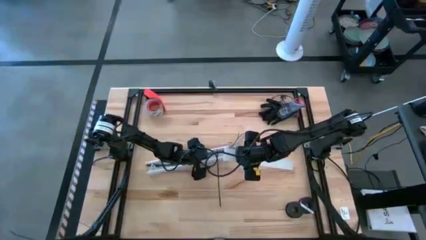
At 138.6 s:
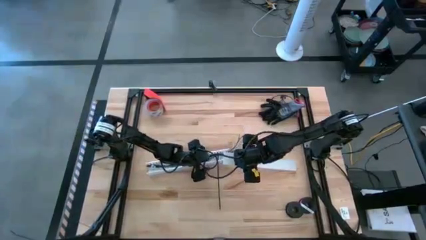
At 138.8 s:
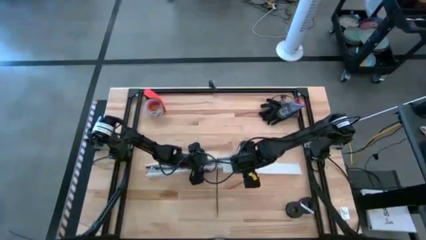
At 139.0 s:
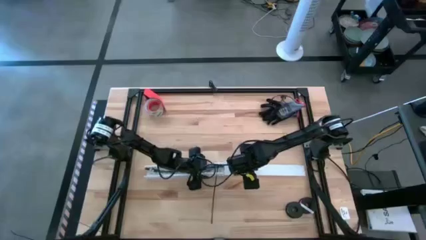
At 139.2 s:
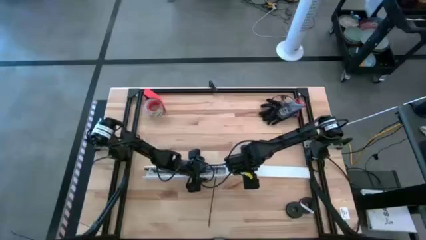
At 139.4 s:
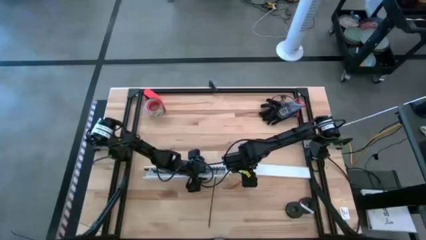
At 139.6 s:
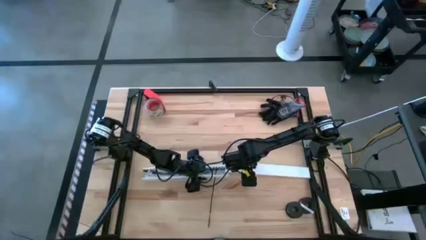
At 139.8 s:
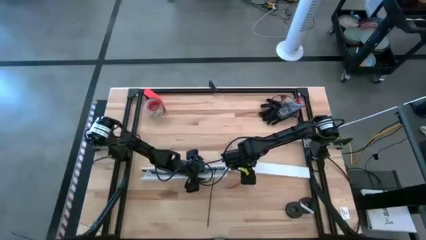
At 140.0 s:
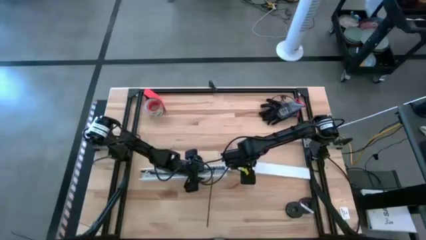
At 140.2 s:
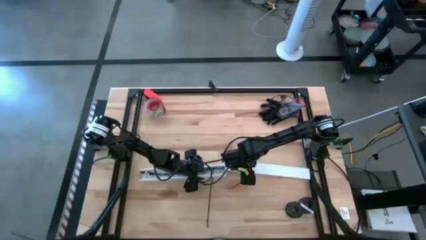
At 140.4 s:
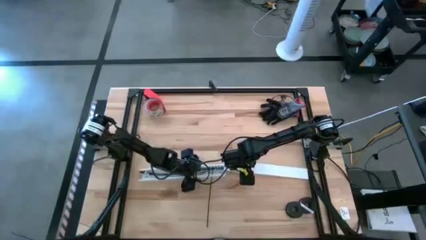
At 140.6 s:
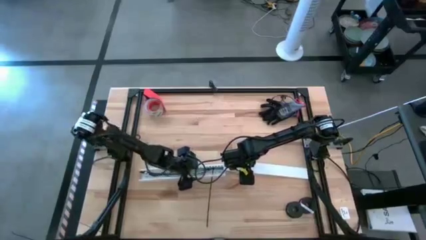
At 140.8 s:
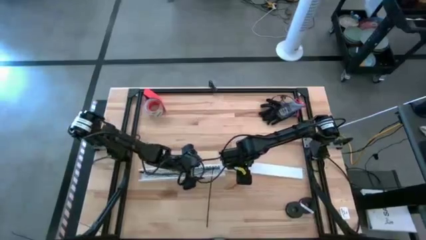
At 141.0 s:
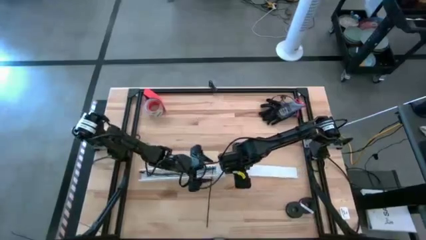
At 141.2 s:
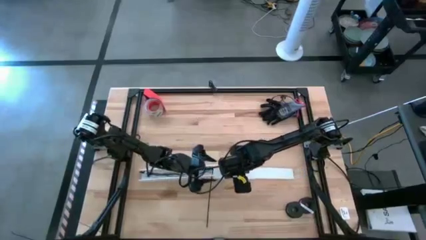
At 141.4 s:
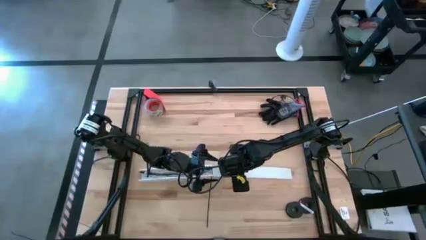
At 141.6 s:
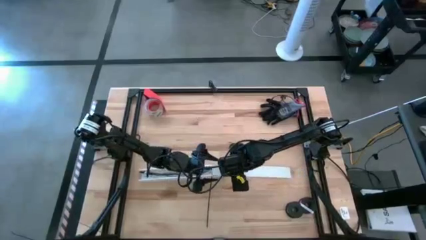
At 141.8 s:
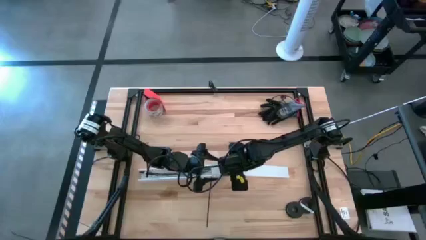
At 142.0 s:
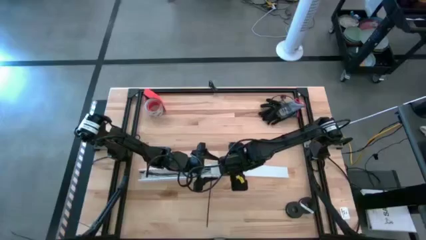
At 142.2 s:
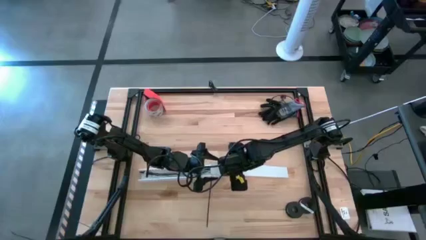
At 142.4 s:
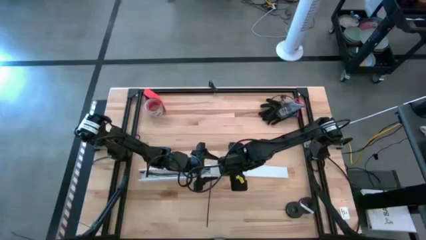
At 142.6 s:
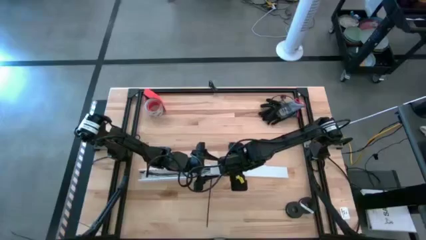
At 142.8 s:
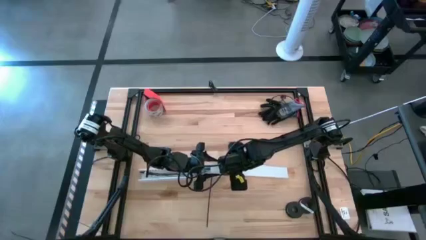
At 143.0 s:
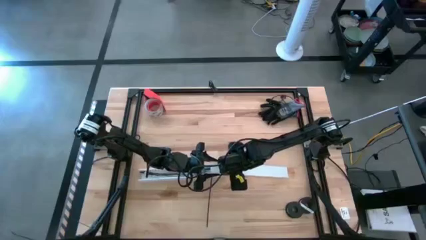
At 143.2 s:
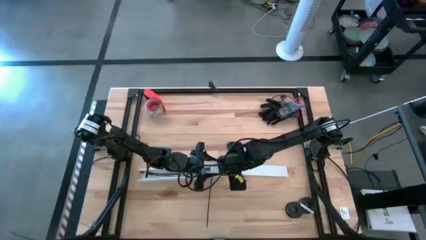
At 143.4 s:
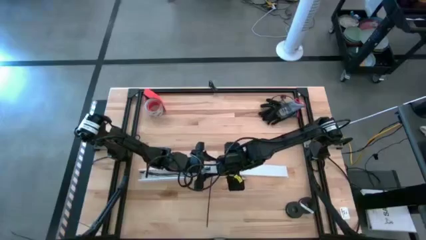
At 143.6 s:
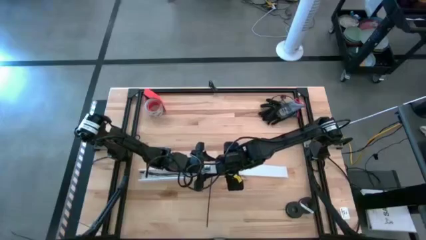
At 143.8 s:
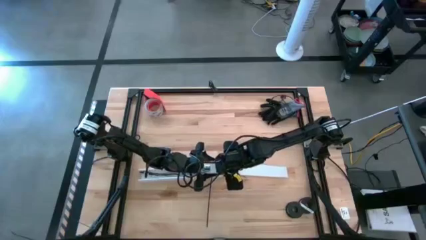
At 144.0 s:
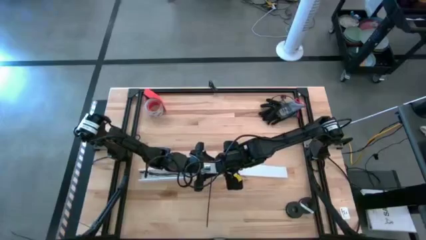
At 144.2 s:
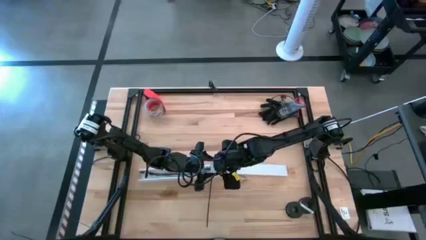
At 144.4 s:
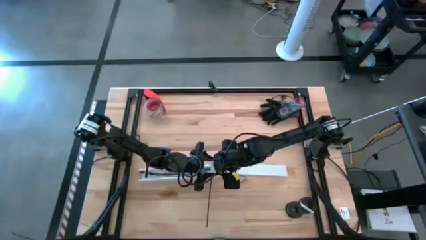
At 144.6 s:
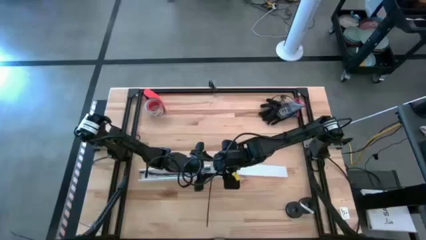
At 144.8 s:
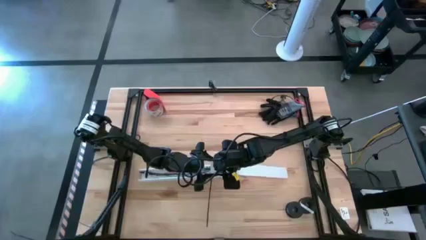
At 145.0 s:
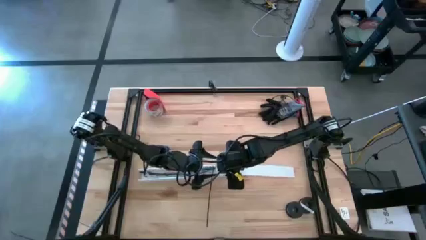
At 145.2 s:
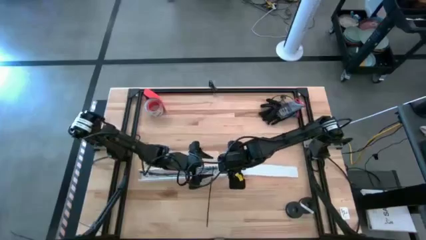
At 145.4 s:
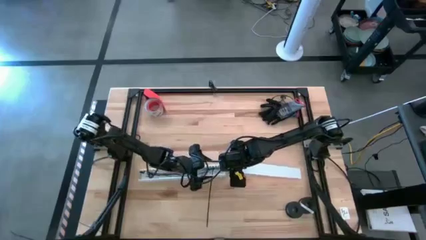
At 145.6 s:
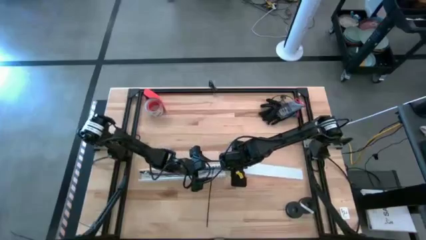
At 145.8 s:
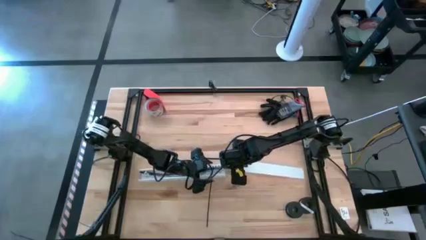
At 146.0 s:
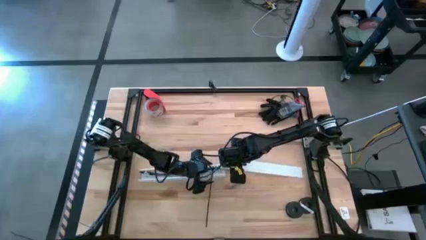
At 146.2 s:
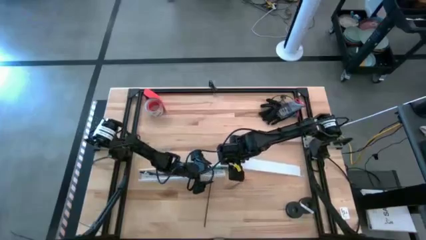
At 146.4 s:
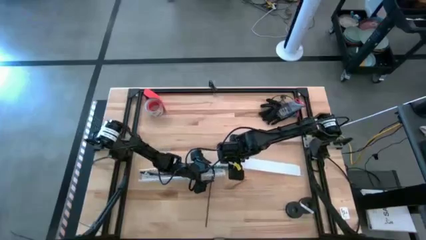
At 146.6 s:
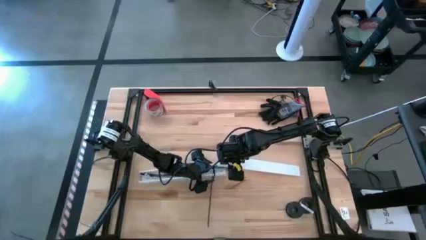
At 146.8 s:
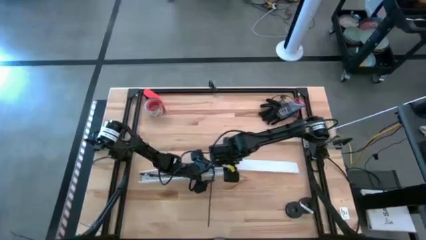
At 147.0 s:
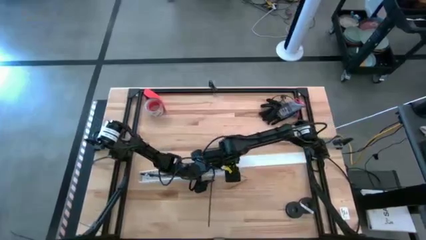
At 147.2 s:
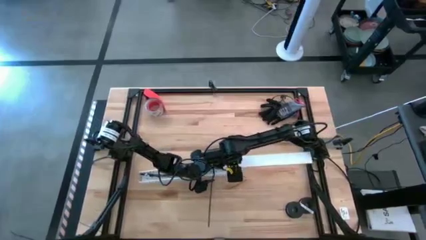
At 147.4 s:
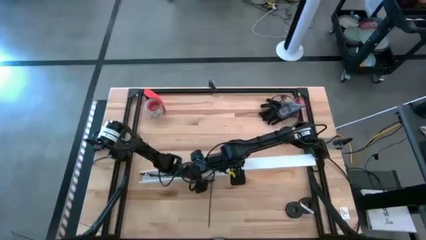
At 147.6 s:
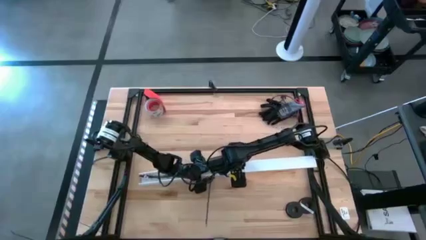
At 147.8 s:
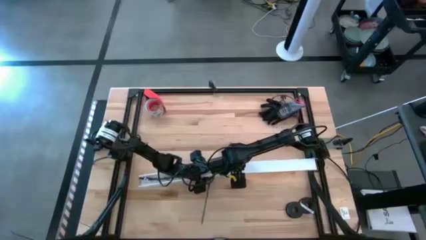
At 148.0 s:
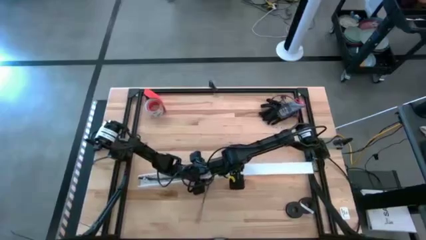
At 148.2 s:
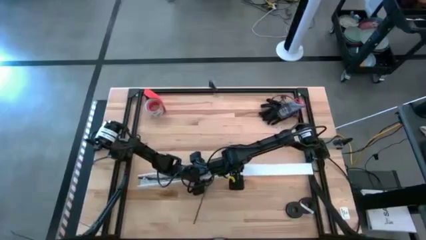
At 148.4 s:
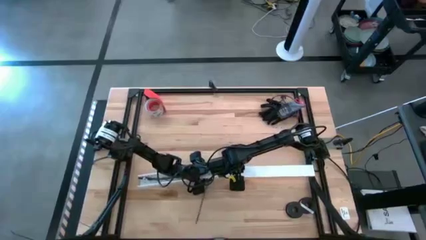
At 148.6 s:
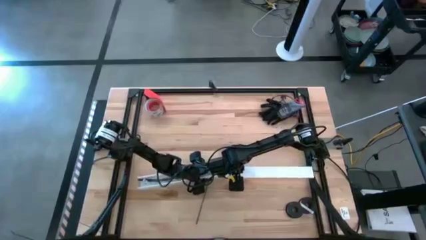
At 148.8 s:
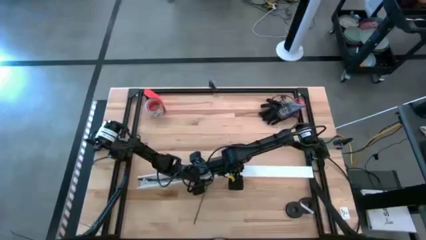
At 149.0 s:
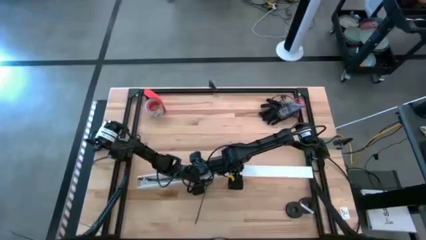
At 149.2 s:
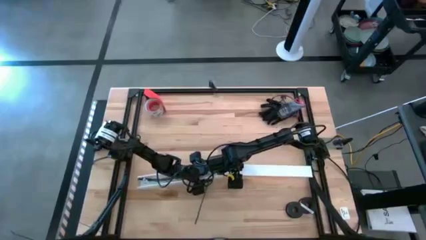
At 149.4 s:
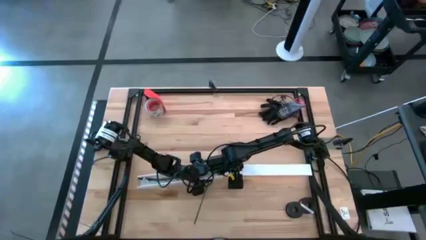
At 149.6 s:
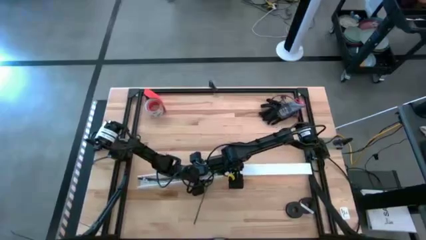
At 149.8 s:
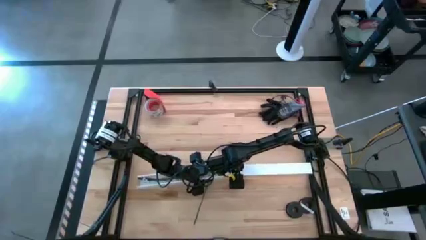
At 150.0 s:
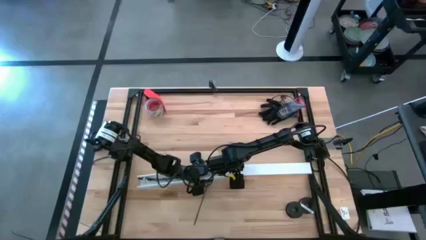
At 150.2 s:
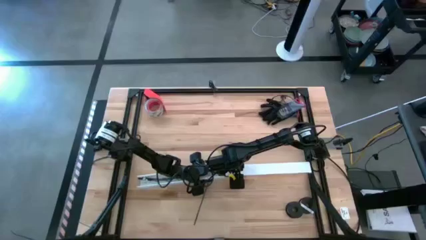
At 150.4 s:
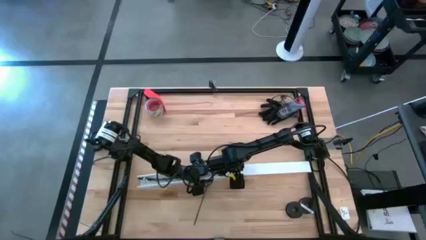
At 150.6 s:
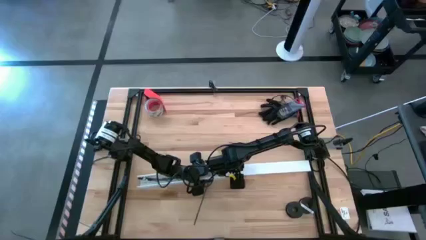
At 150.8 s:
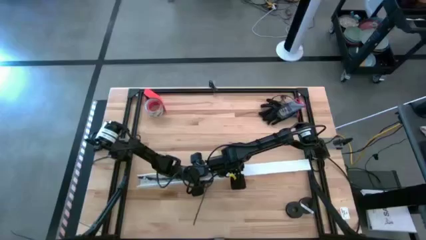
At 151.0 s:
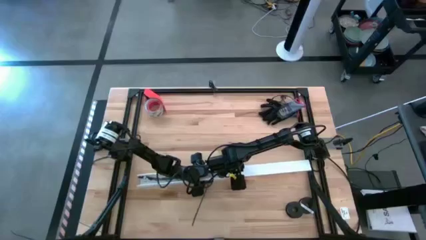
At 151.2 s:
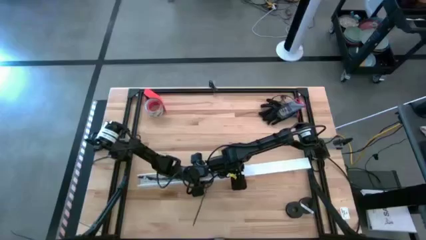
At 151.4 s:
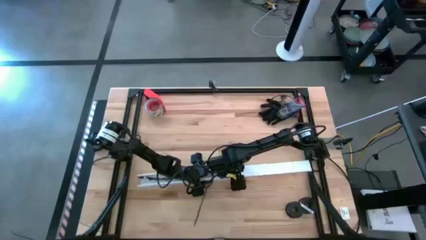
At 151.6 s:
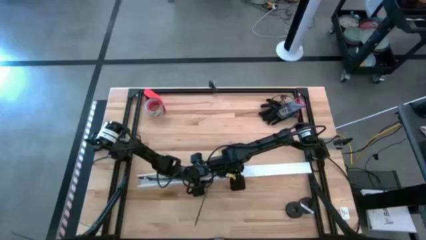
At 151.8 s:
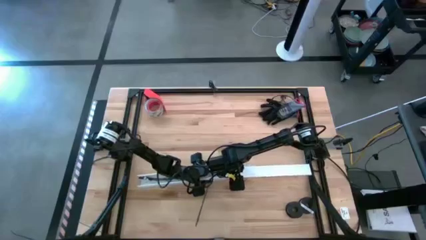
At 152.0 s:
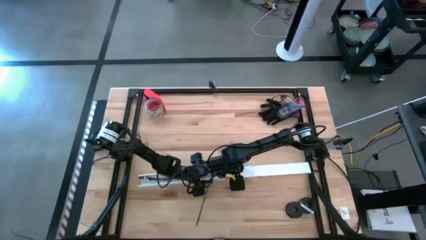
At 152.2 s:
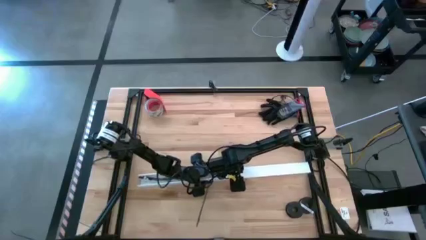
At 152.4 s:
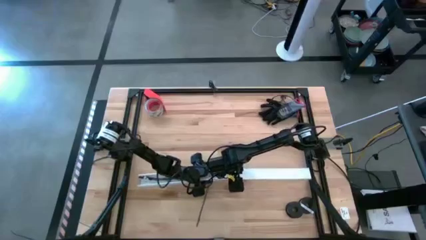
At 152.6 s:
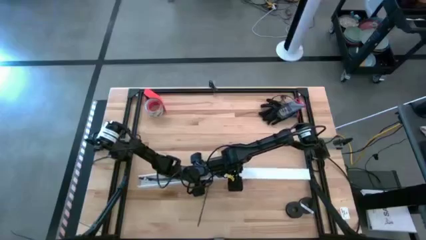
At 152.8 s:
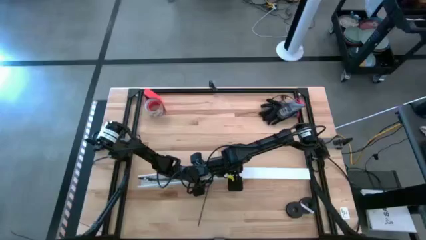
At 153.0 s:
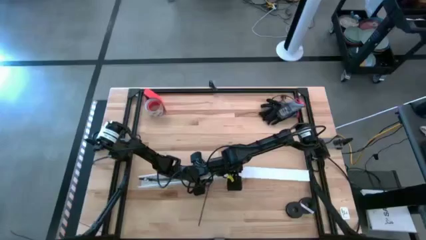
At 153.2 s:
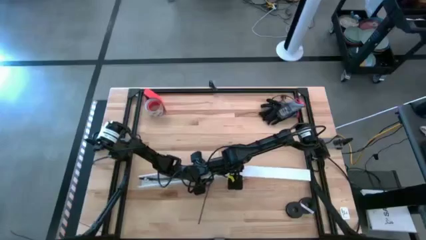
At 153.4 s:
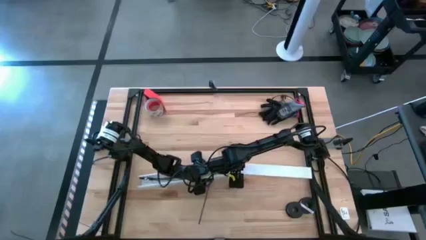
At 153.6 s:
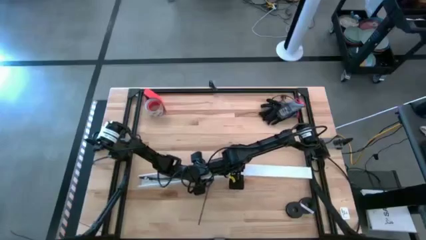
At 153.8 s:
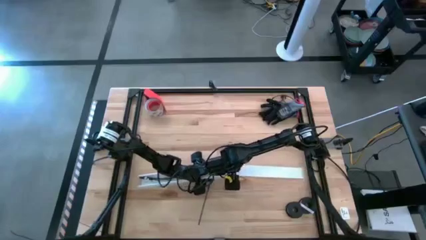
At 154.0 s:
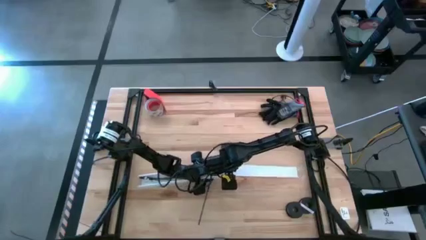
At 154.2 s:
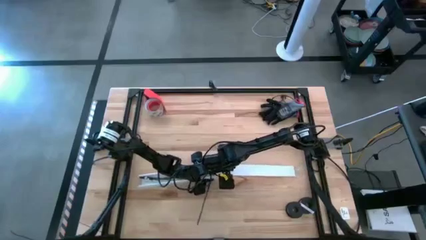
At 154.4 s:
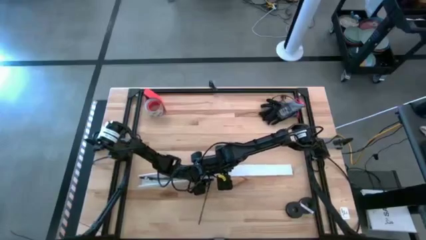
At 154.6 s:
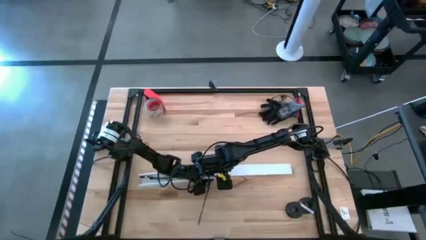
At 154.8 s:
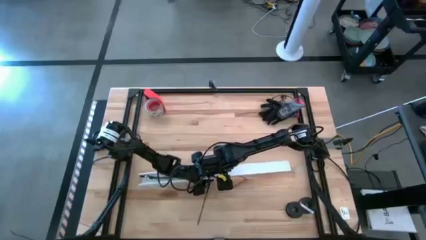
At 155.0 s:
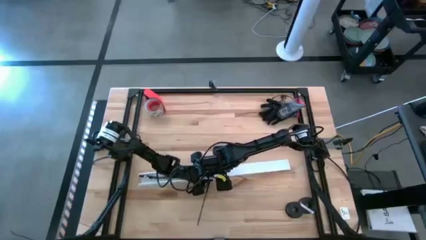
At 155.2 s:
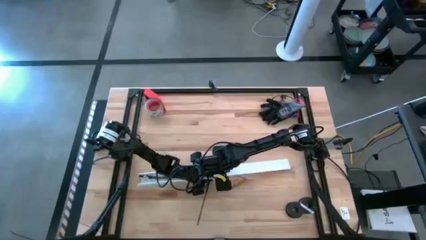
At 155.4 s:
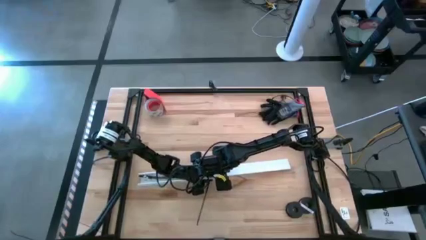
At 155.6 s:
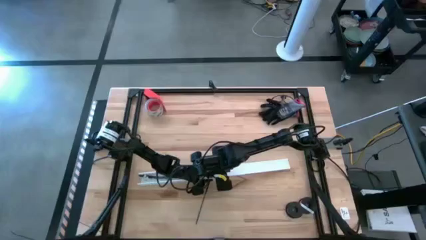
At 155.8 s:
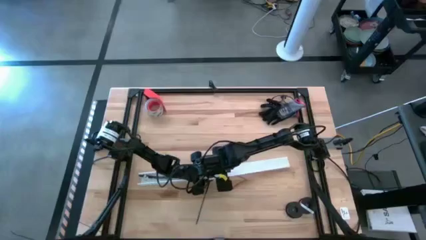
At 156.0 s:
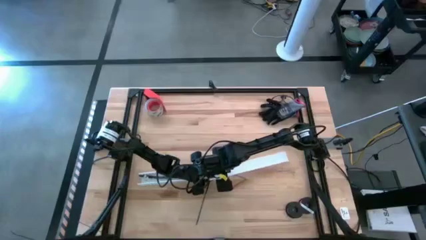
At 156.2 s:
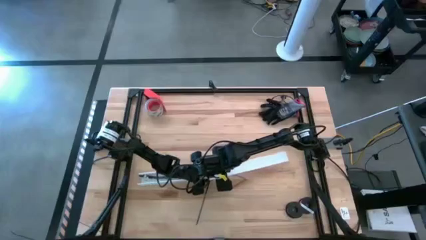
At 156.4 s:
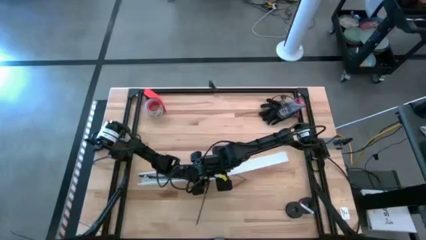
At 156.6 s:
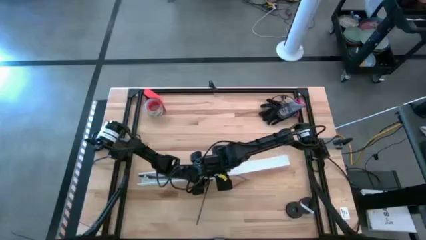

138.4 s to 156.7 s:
Task: Ziptie cables
Close the cable duct
